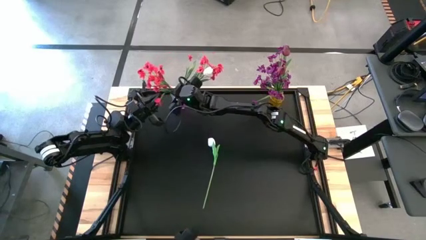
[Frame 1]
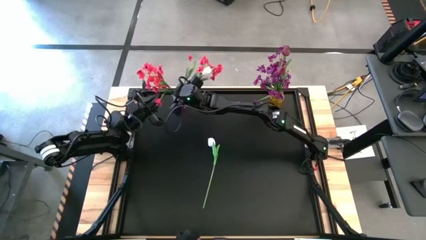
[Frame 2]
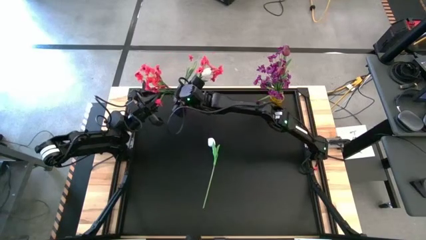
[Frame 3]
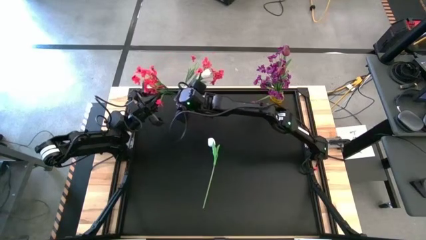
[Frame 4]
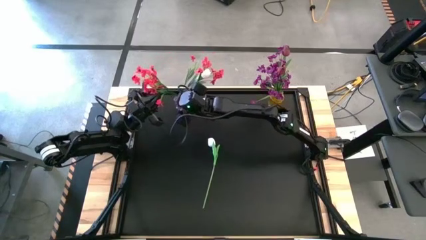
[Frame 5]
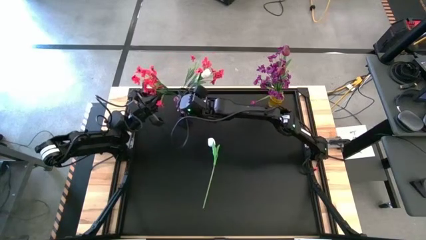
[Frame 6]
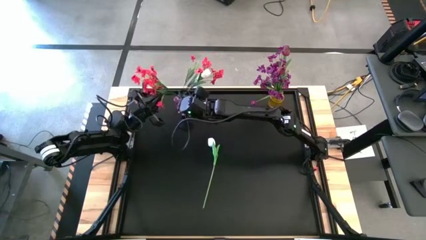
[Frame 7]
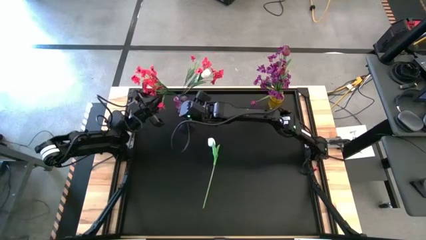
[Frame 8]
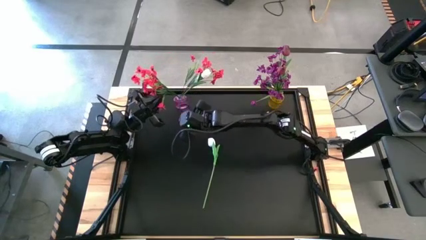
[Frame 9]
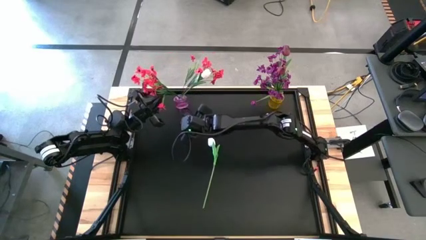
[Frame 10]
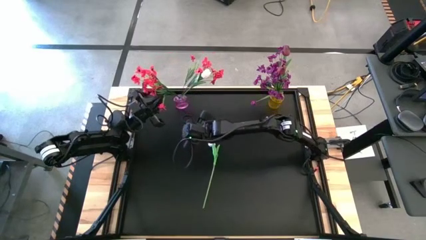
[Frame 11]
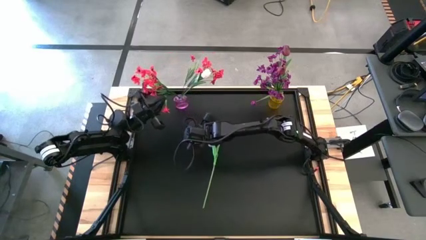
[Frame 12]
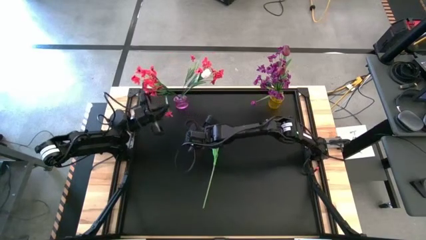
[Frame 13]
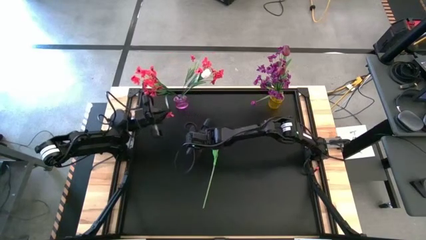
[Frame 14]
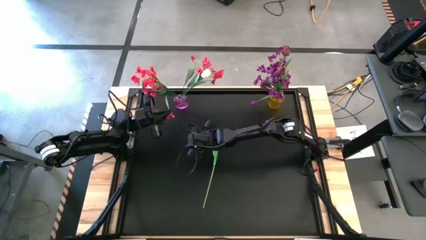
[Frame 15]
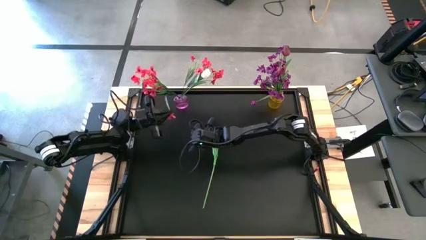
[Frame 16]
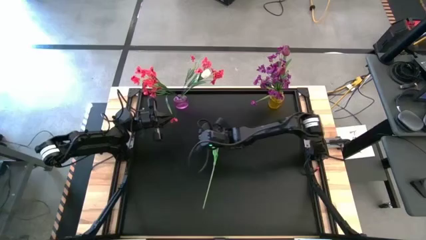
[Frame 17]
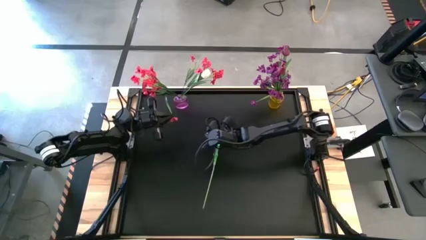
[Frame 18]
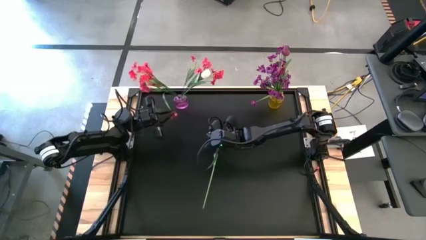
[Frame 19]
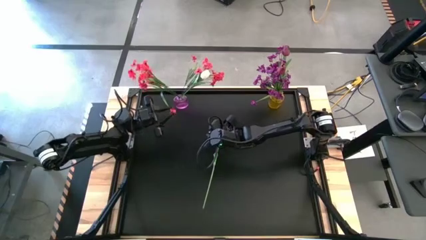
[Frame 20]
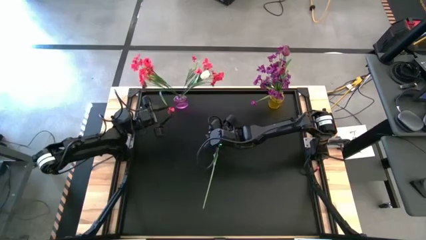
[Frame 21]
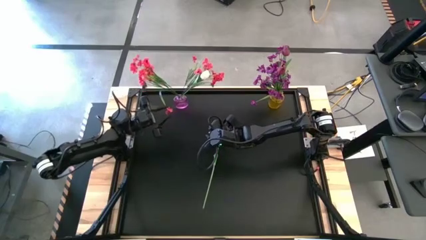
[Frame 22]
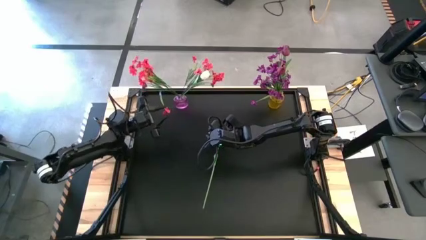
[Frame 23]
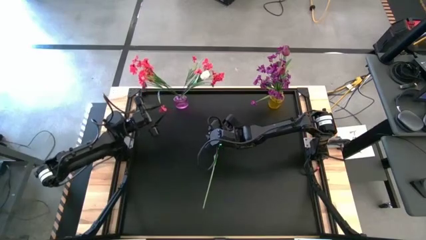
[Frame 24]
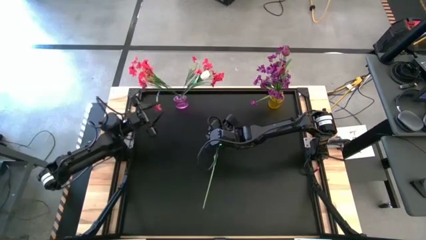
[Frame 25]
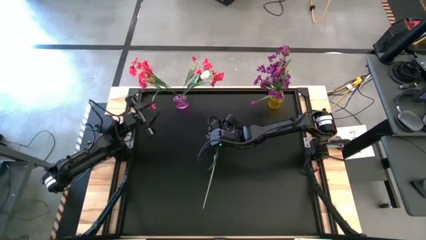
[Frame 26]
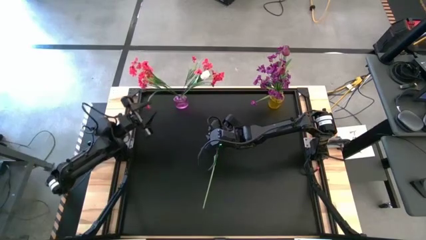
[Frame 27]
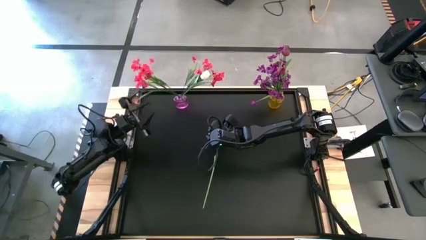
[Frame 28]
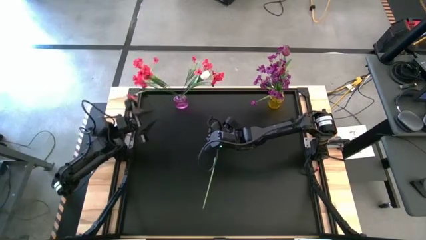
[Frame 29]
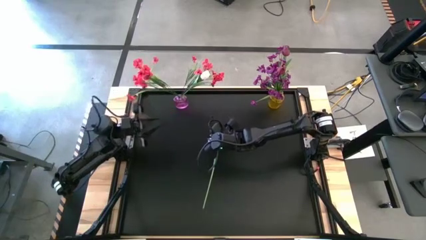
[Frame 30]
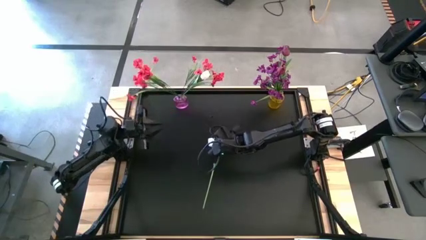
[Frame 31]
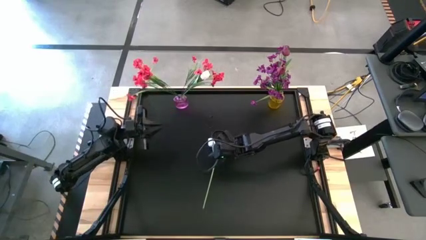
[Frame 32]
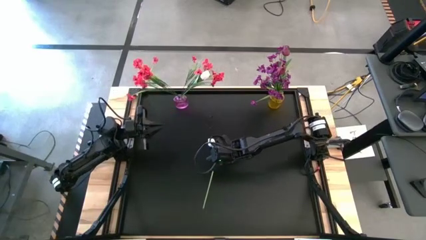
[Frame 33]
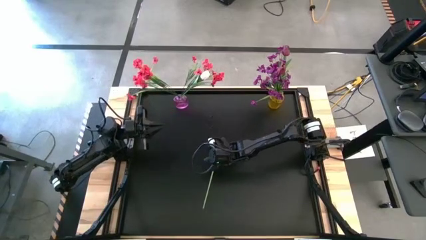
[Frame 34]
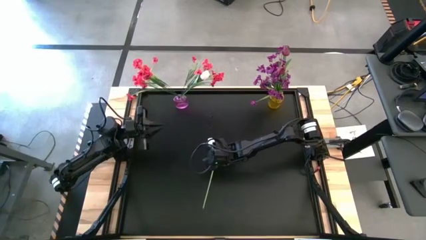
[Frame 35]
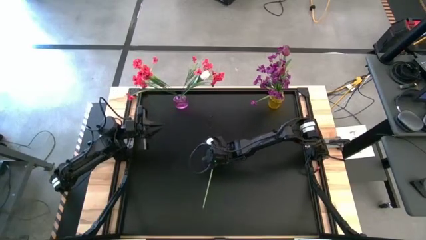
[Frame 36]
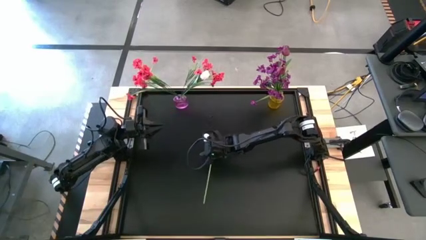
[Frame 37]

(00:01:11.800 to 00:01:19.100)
Task: Sort flowers into vase by color
Put the white tulip into the purple vase

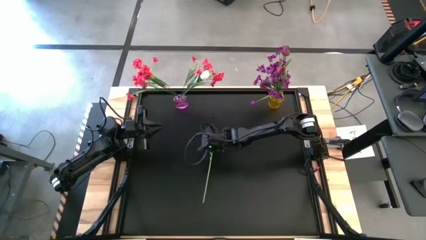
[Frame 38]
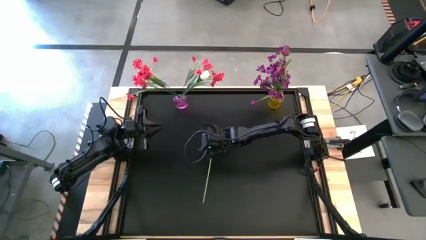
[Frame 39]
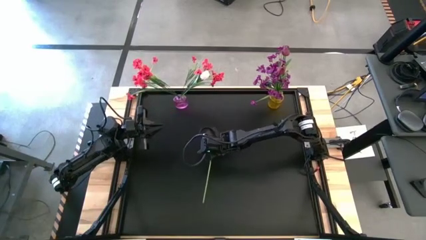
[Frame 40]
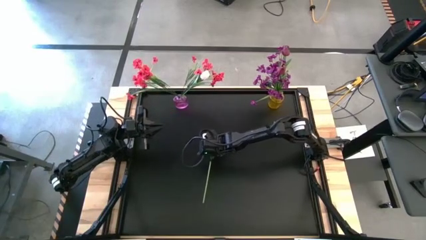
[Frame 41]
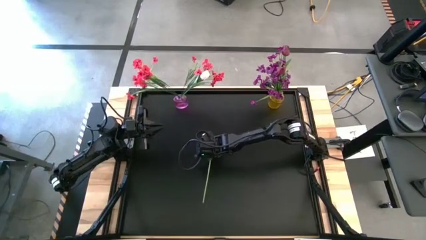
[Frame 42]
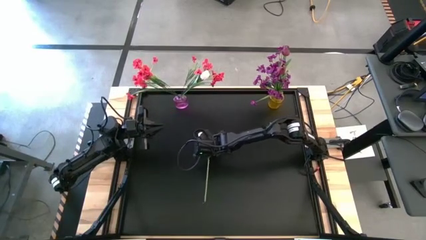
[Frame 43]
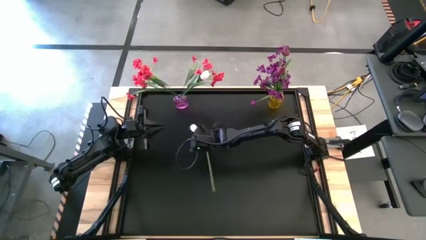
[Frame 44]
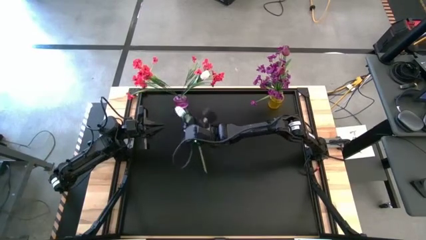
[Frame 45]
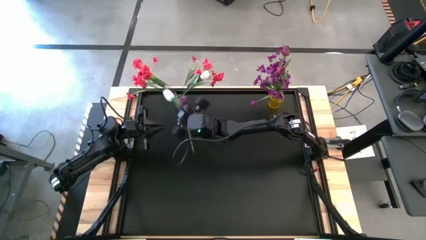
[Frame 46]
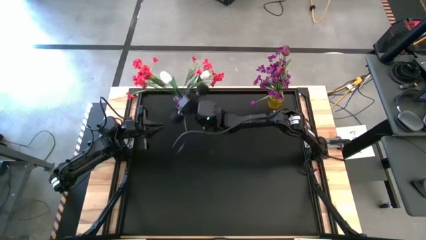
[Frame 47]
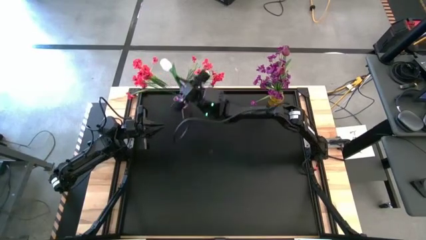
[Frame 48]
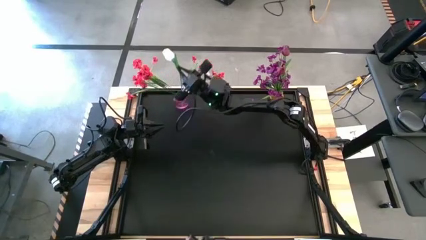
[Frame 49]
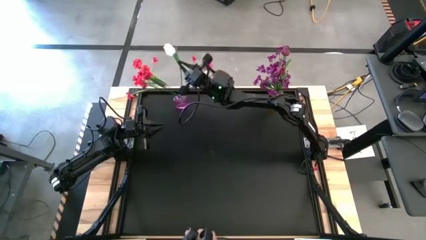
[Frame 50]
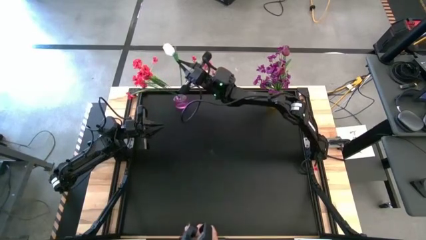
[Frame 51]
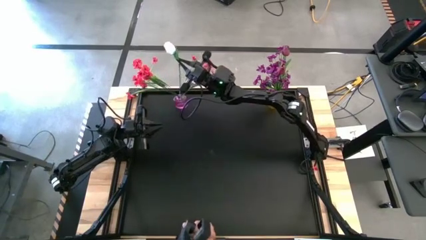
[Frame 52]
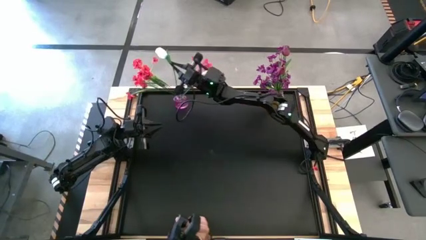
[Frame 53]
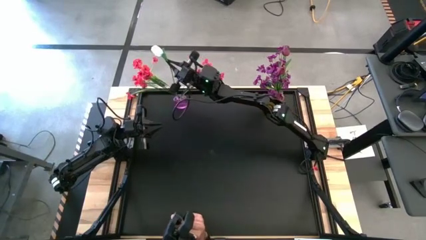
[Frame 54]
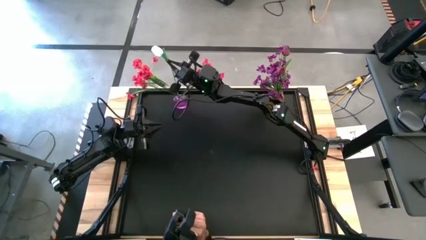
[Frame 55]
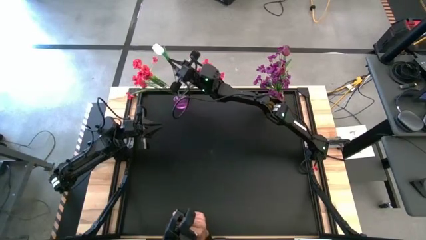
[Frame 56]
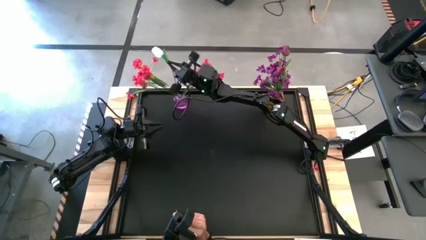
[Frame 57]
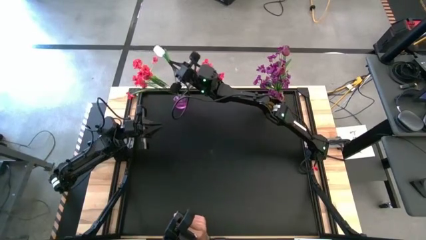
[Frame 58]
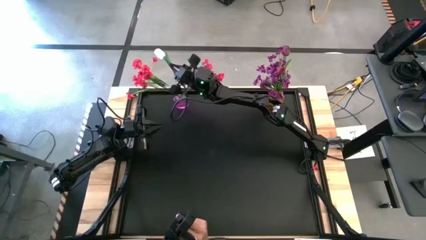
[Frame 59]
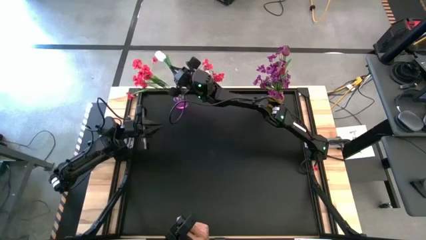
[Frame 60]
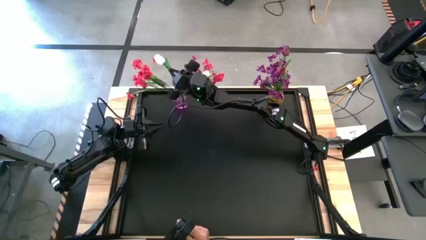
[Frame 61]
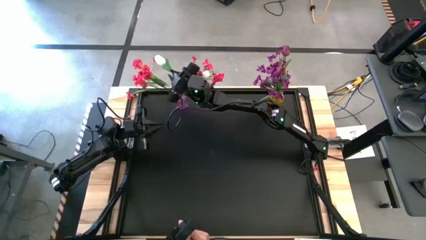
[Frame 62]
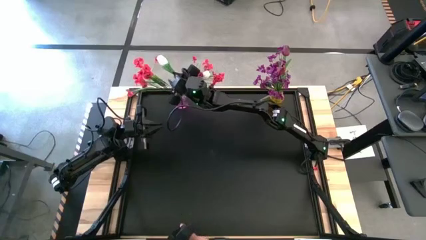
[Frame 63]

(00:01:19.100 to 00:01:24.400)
Put the white tulip into the purple vase

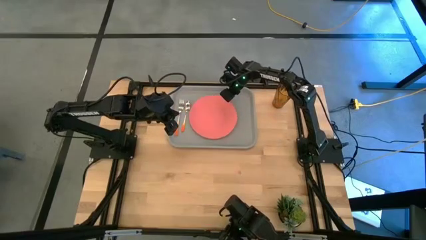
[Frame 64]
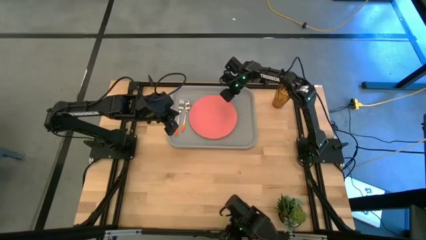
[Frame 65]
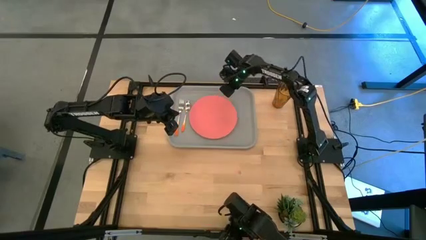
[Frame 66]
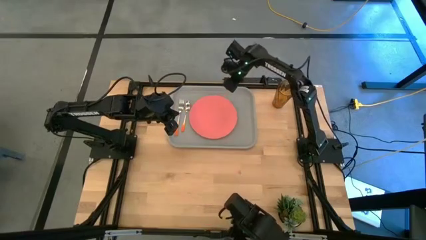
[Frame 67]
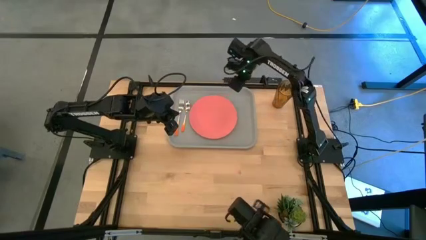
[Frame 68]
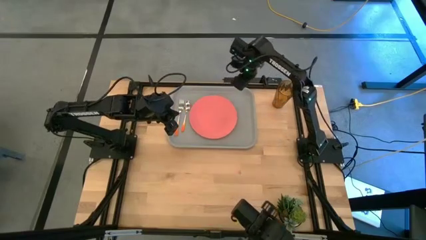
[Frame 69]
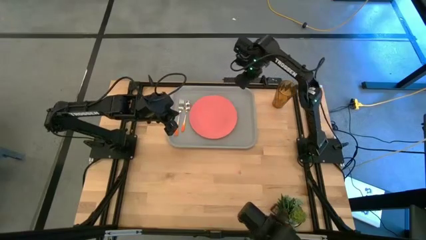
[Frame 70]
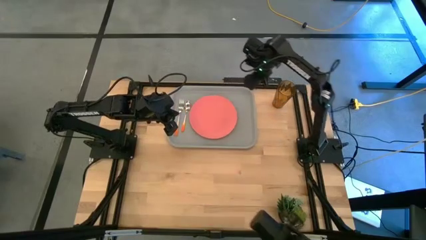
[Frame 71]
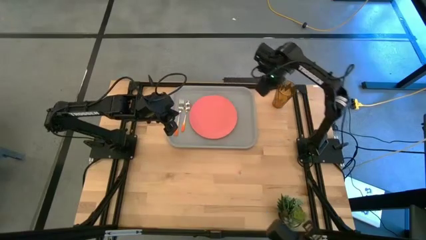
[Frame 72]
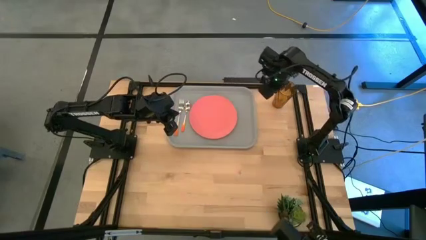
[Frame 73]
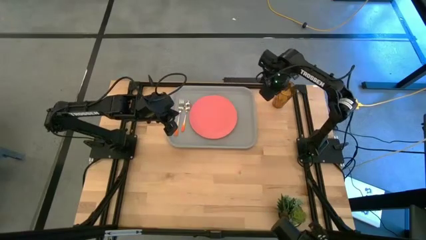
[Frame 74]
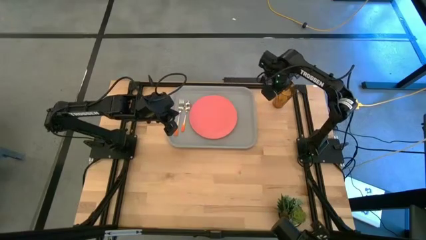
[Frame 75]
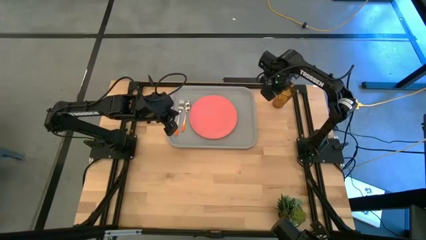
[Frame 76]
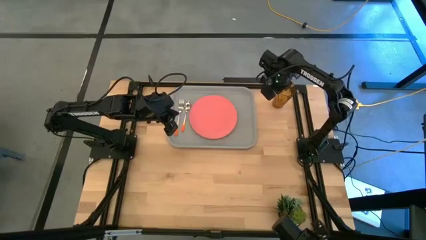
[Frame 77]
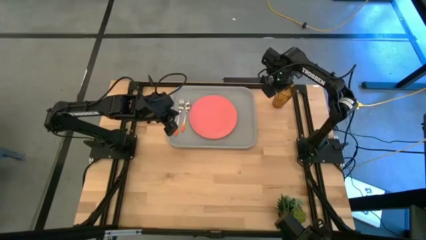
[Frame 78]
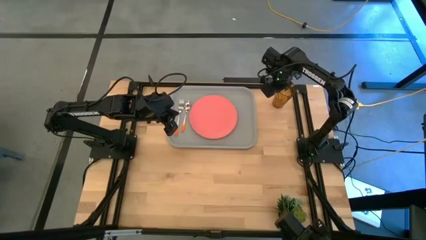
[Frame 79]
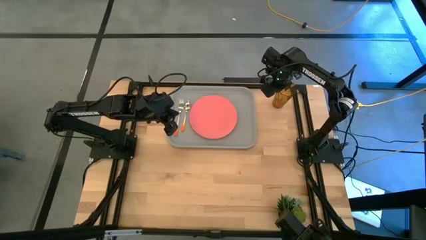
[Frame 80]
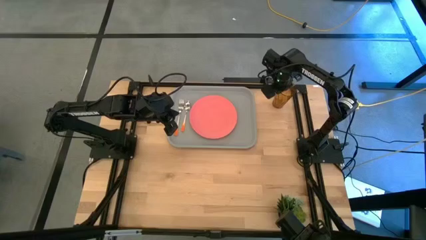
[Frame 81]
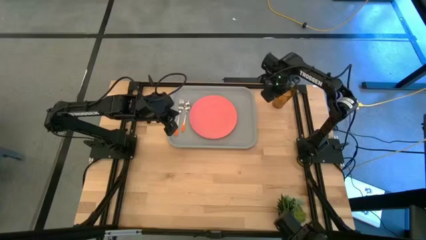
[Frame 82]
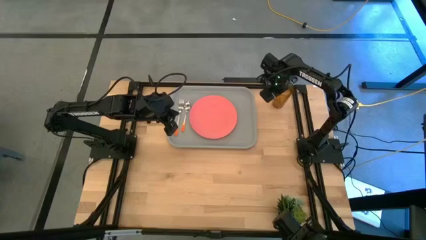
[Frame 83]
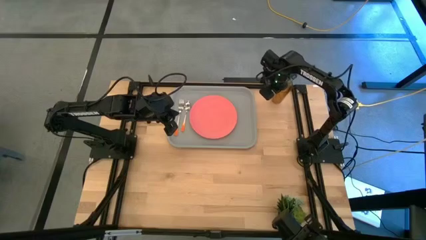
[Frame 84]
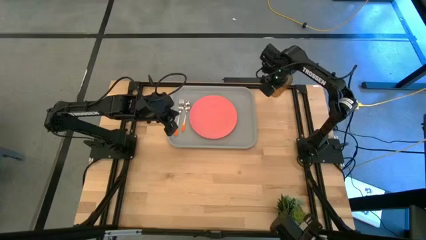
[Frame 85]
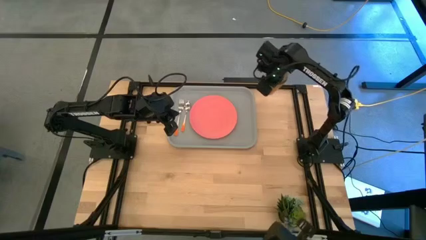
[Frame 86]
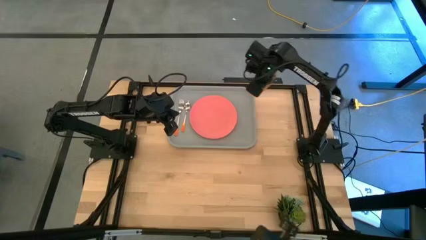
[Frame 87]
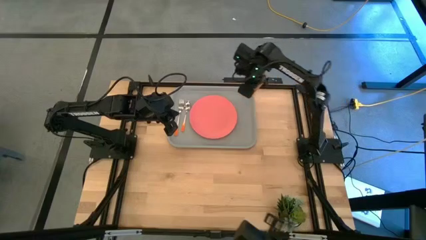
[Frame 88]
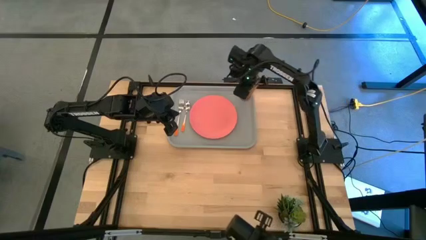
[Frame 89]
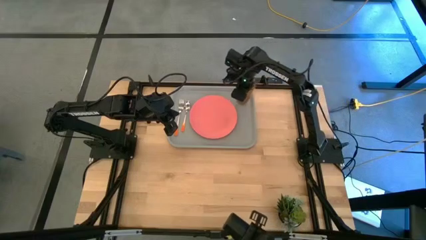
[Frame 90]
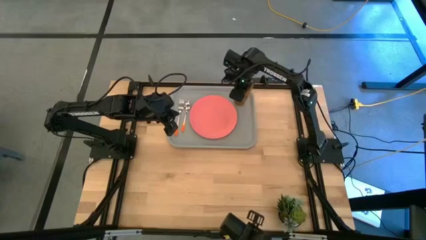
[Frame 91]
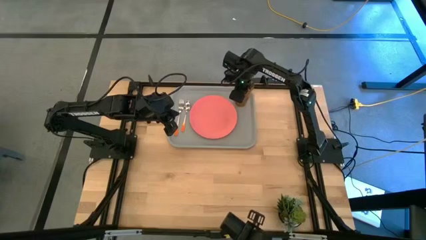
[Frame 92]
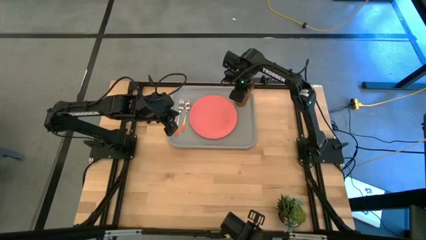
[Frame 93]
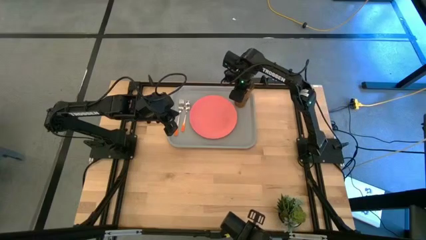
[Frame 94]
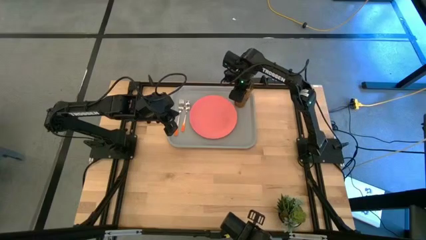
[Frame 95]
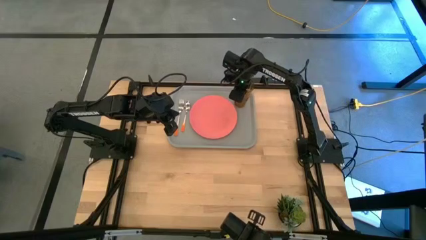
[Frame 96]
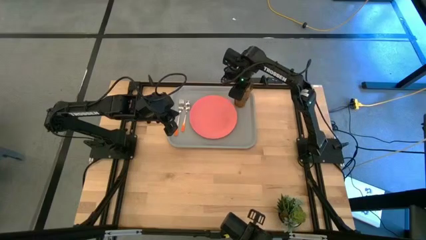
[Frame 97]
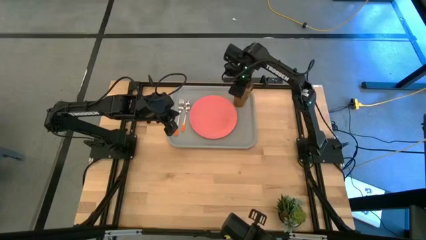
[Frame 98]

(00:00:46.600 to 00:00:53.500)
Task: Pick and place plate/cup/fork/spoon on tray
Put the orange cup on the gray tray to the top right of the pink plate
